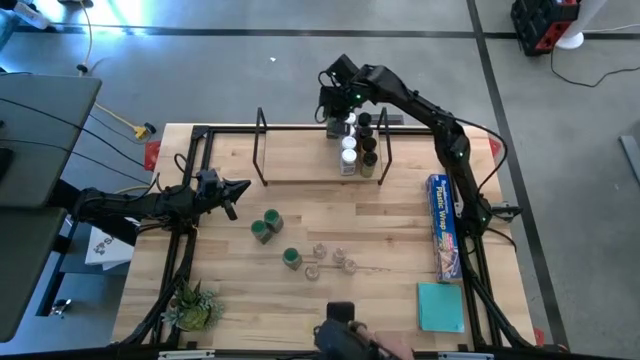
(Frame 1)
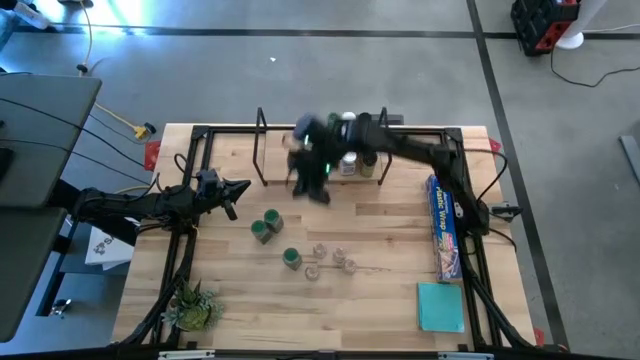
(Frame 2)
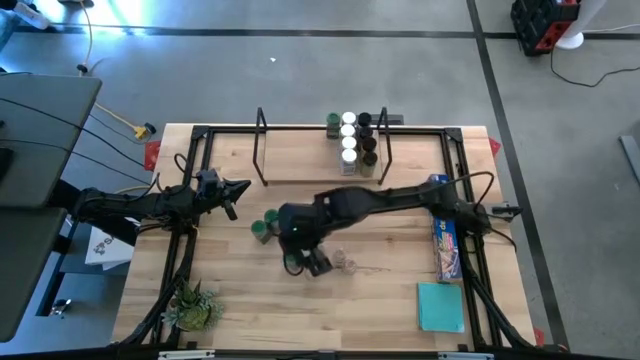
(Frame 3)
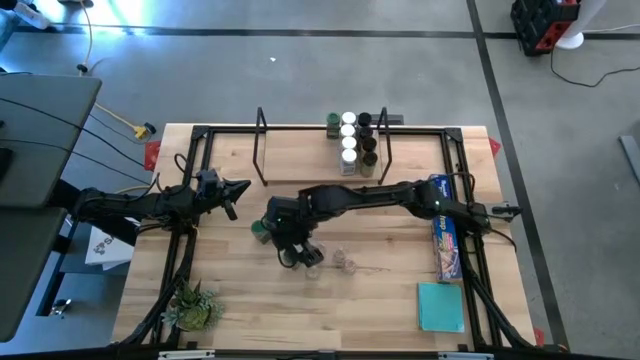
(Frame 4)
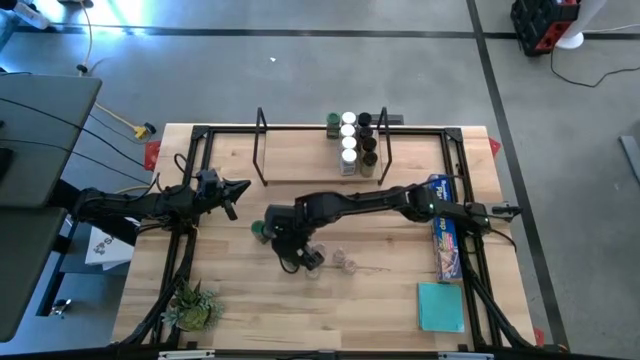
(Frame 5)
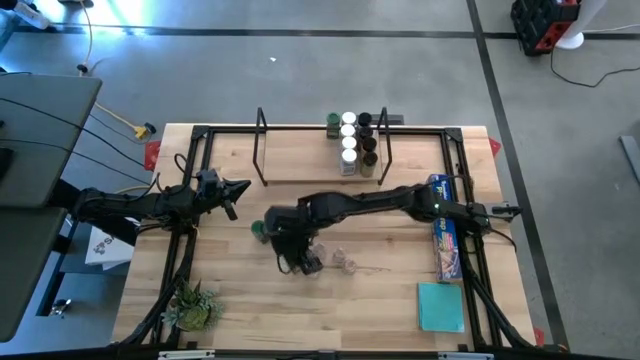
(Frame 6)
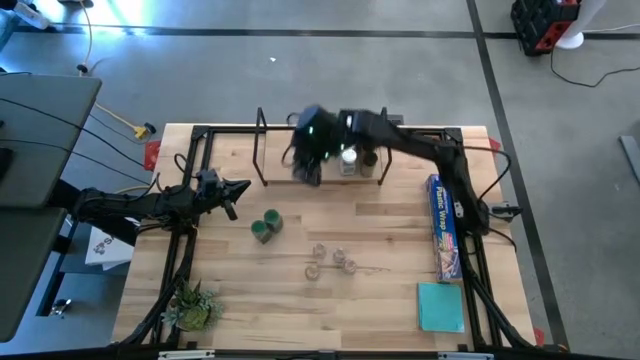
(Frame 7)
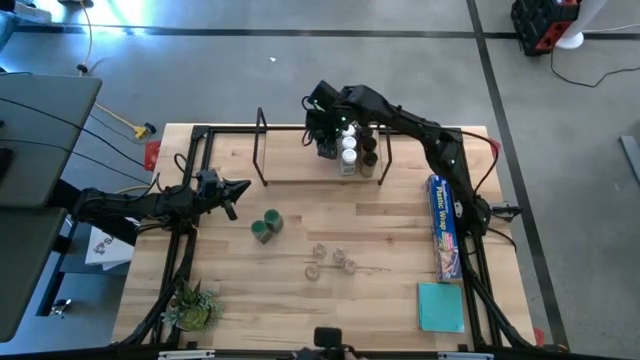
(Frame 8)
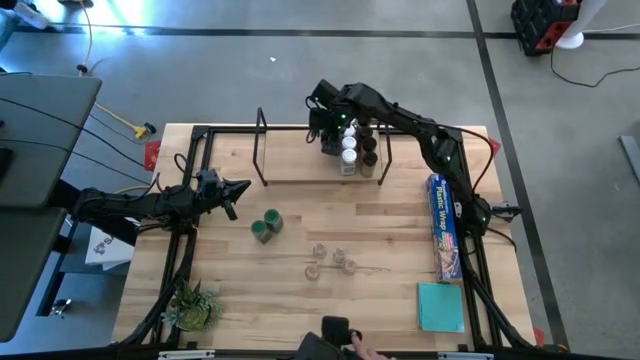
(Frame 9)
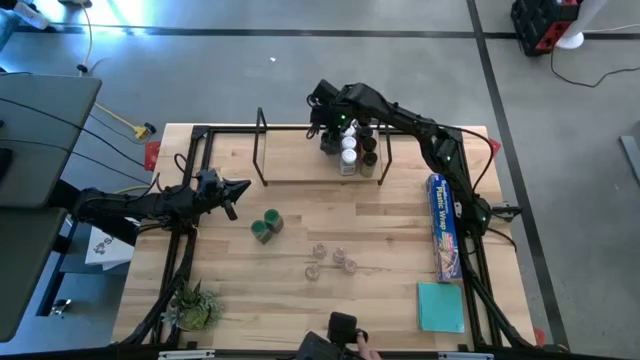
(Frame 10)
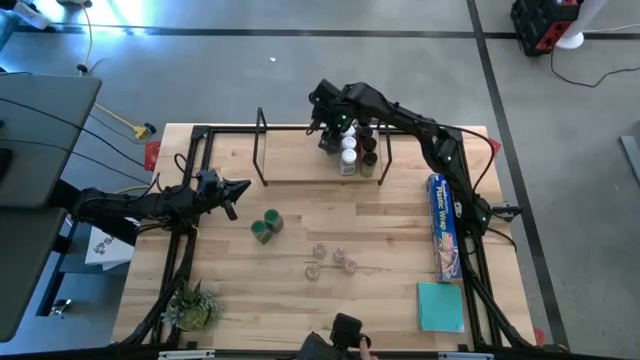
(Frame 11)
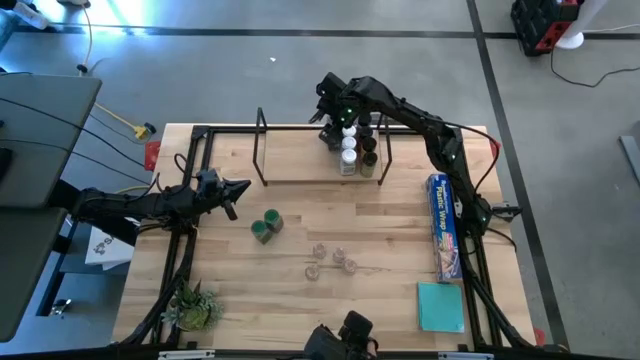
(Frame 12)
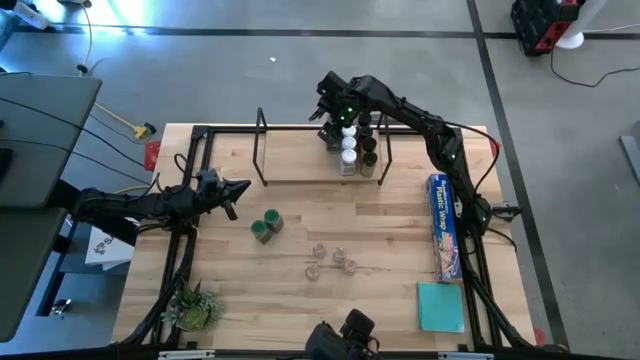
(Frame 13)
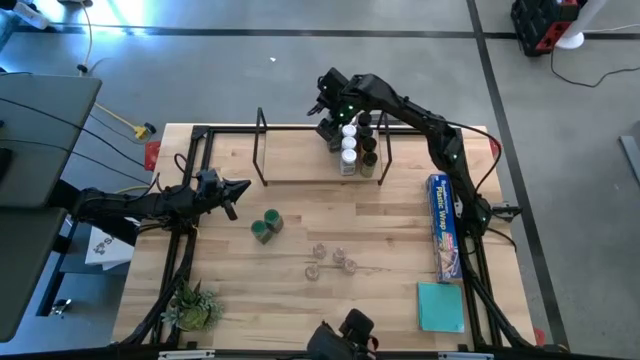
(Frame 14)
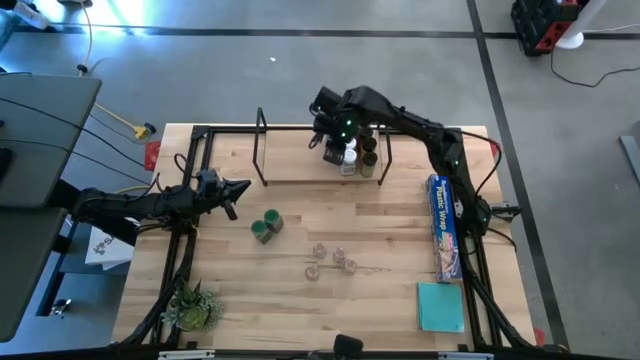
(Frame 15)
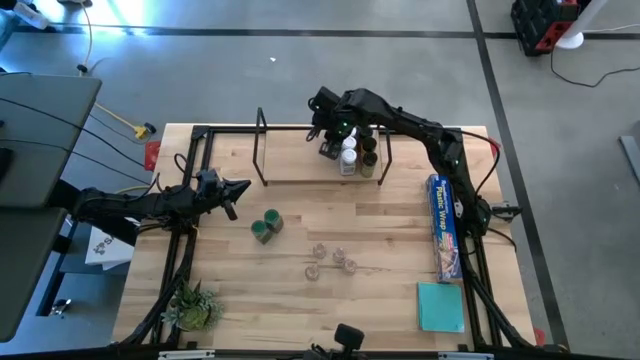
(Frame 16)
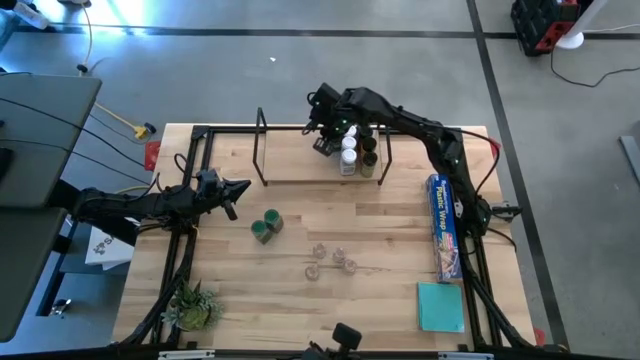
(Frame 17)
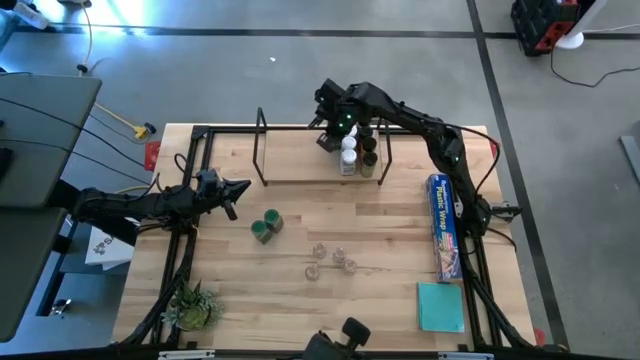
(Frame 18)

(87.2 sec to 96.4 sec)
Task: Shelf spices
Put the bottom green seasoning bottle on the shelf and align with the other green seasoning bottle

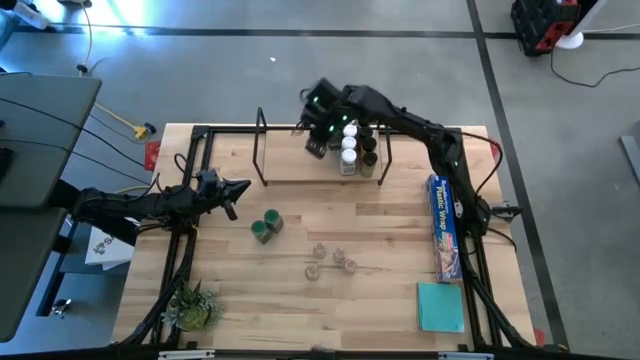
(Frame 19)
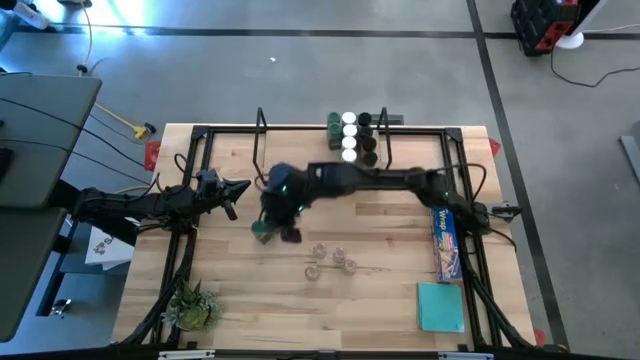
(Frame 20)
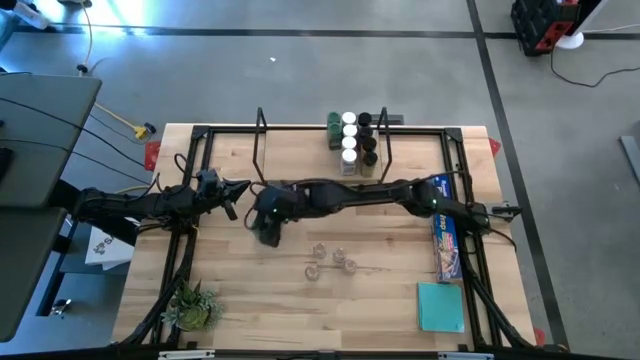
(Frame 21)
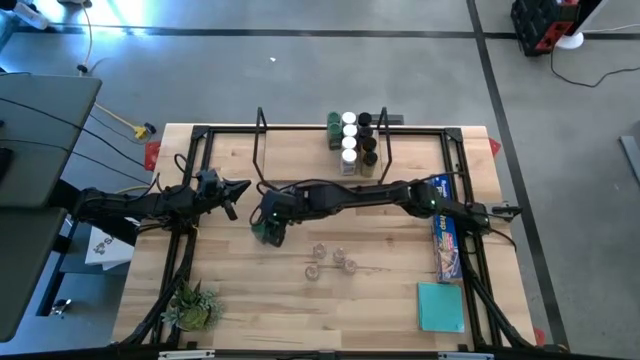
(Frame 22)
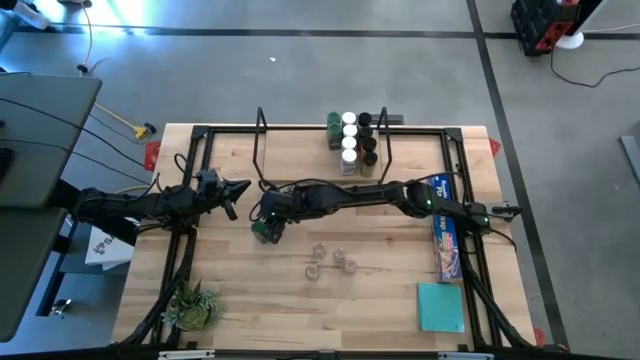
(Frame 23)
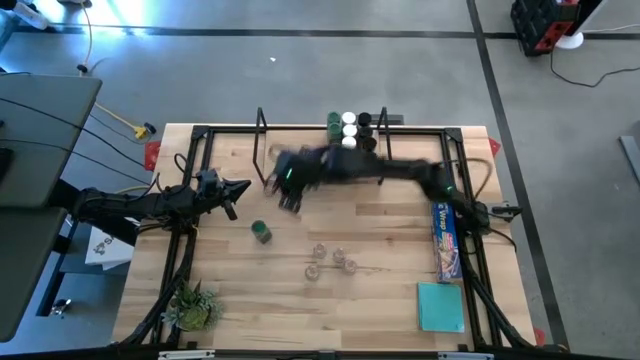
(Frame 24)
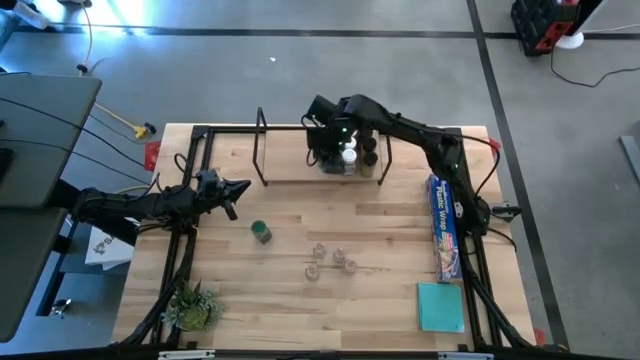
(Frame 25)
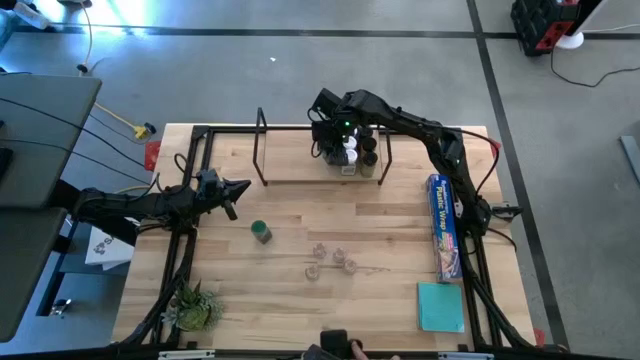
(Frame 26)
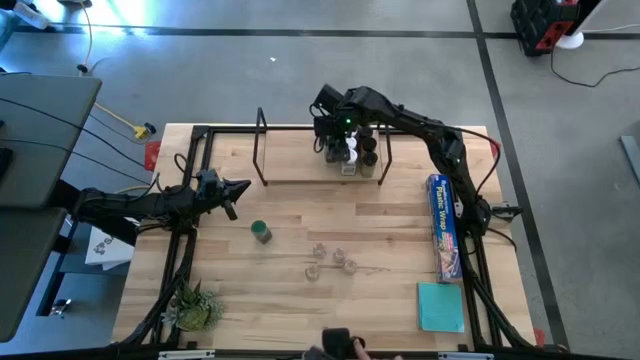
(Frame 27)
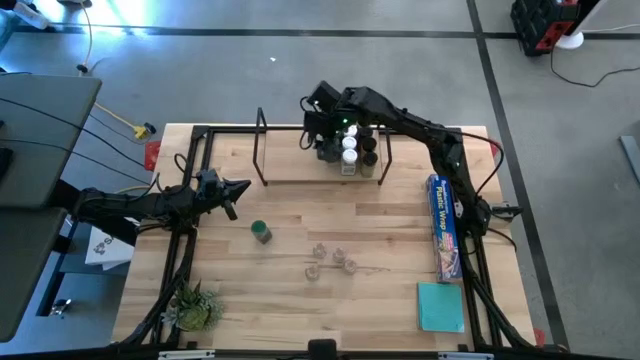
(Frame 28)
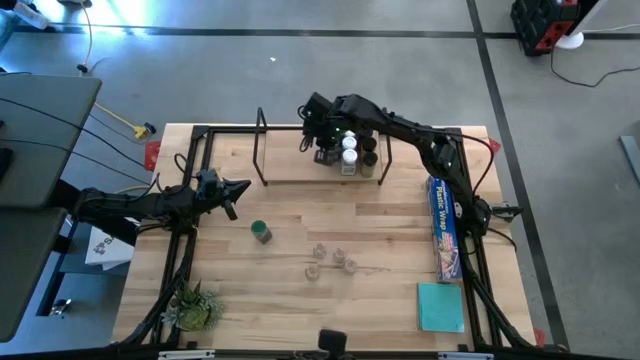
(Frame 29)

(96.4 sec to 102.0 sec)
Put the top green seasoning bottle on the shelf and align with the other green seasoning bottles

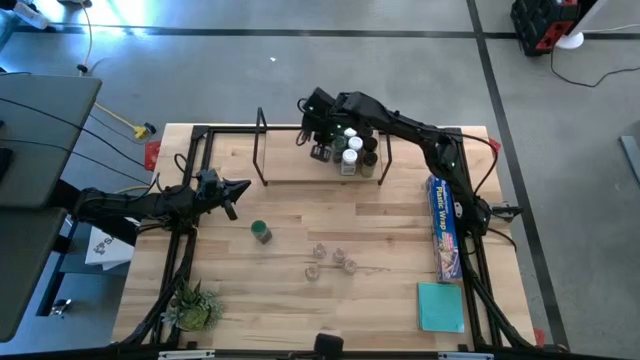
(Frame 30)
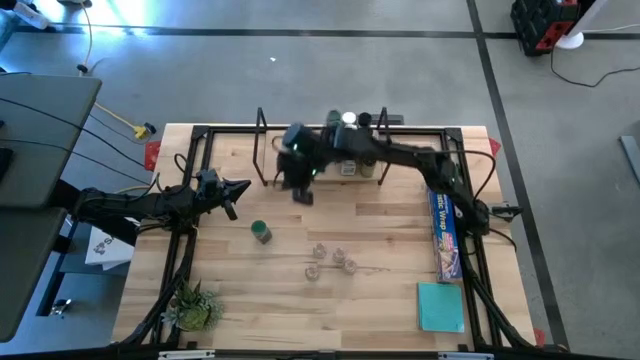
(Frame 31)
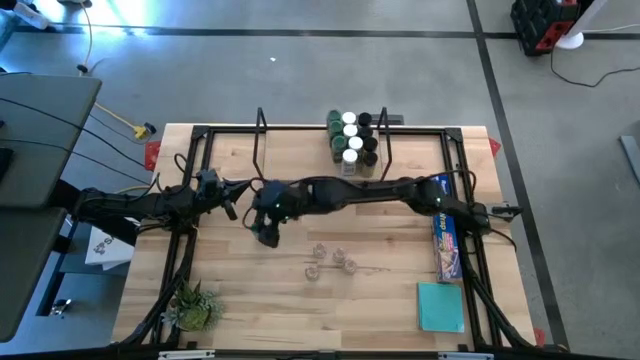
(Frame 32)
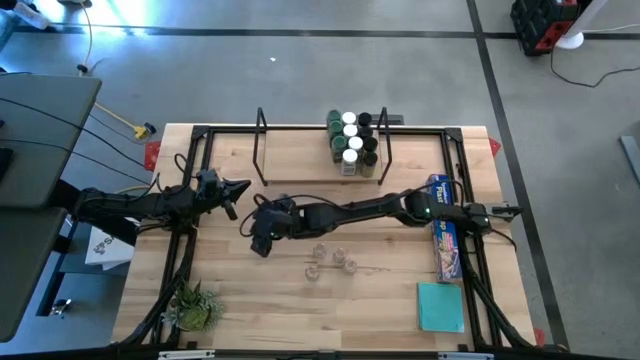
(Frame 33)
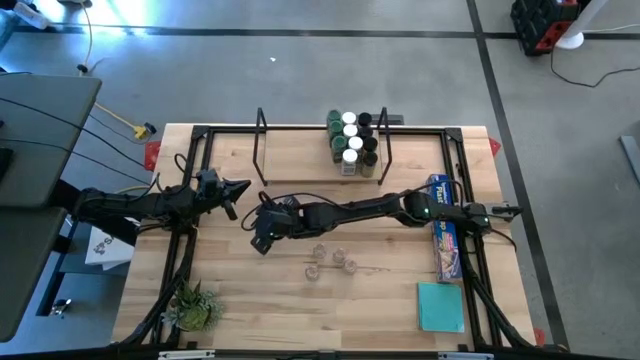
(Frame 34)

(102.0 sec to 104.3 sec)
Put the green seasoning bottle on the shelf and align with the other green seasoning bottles
